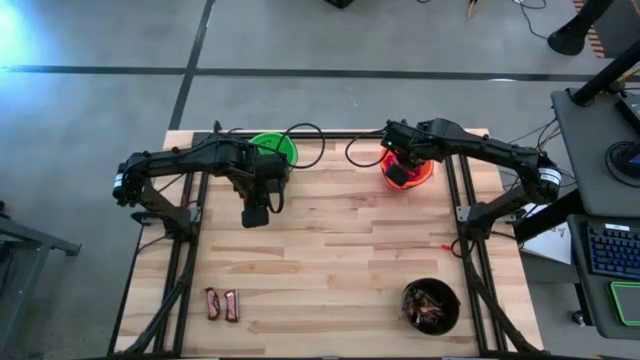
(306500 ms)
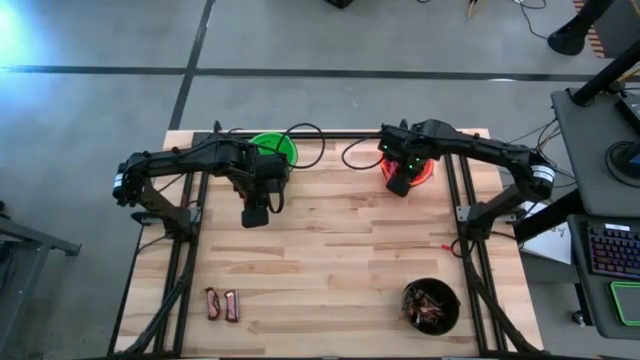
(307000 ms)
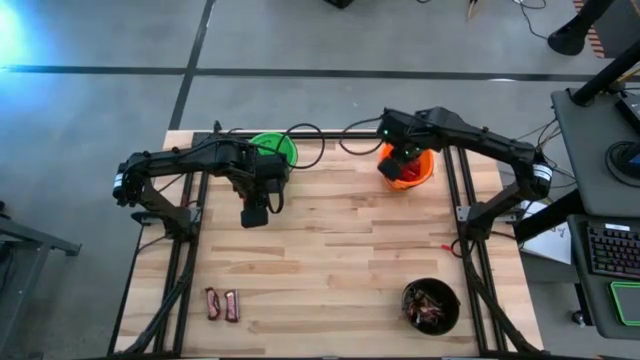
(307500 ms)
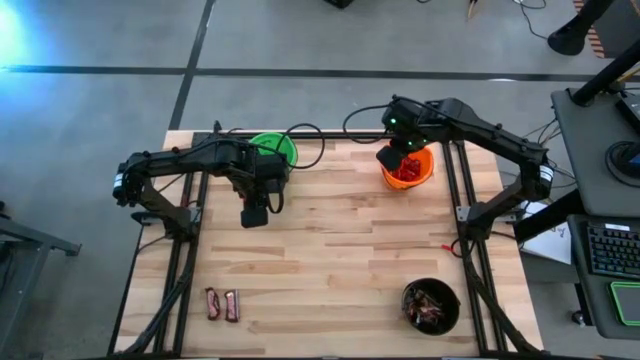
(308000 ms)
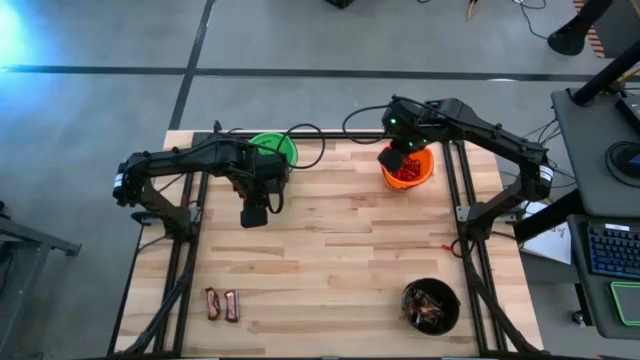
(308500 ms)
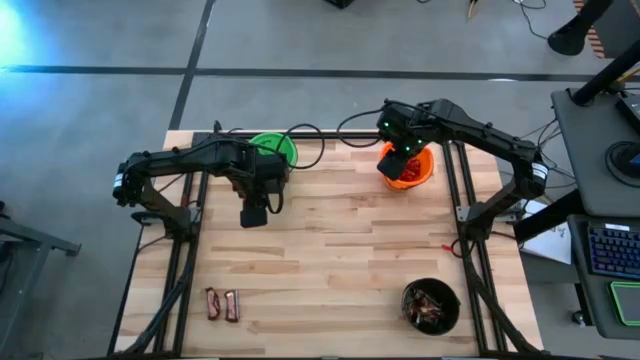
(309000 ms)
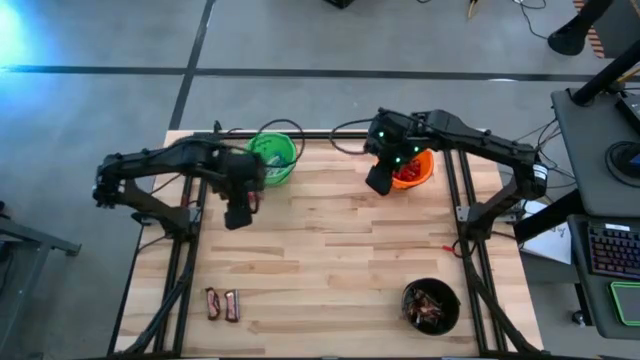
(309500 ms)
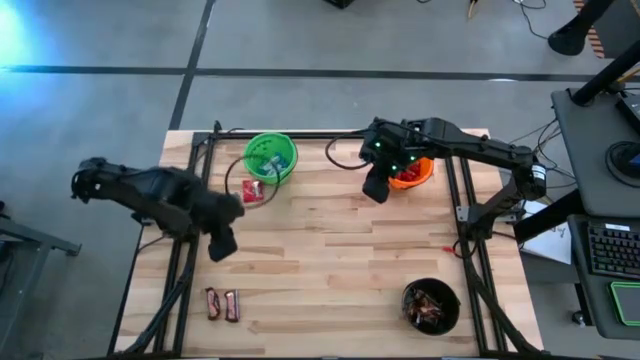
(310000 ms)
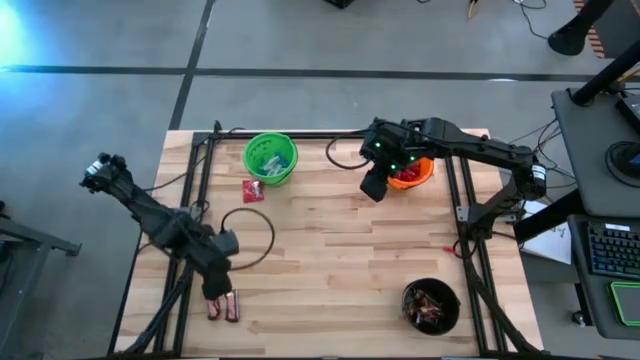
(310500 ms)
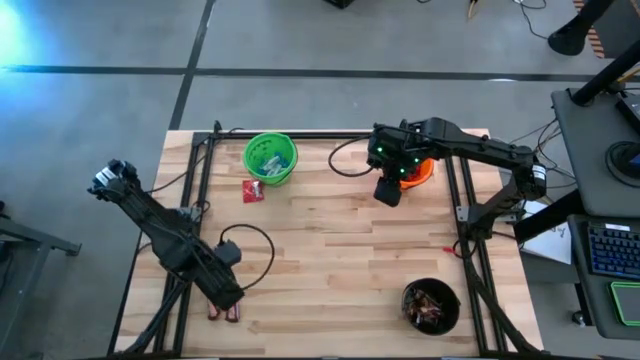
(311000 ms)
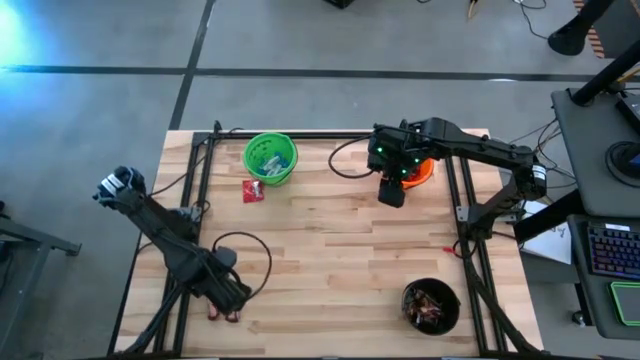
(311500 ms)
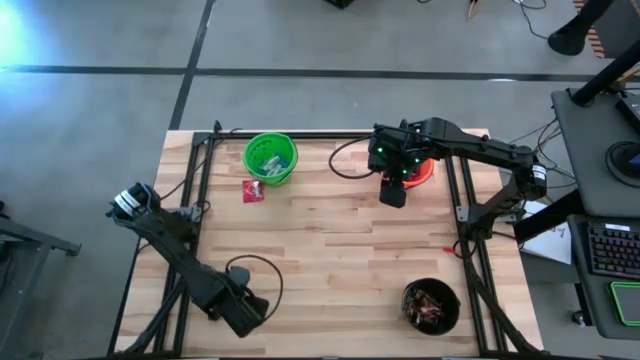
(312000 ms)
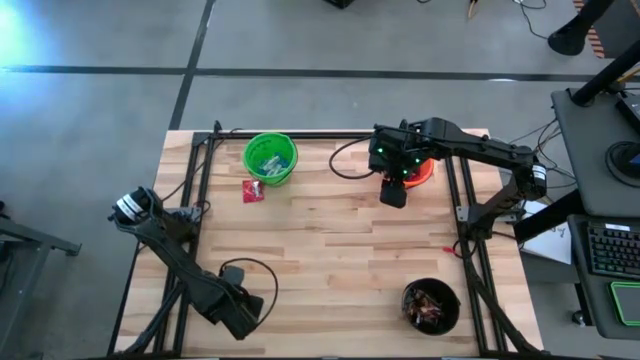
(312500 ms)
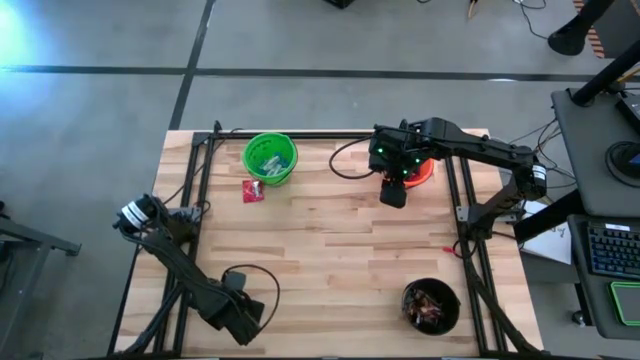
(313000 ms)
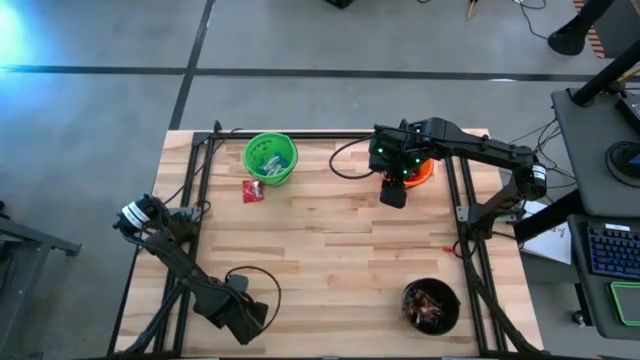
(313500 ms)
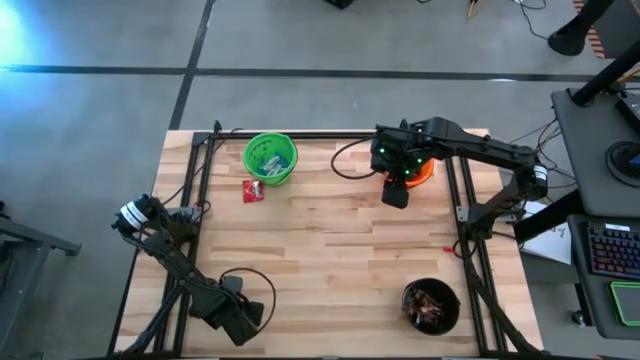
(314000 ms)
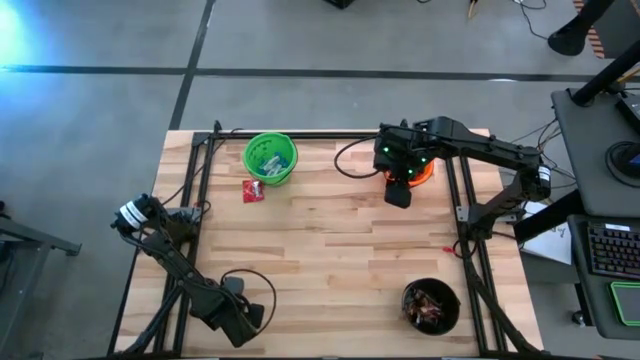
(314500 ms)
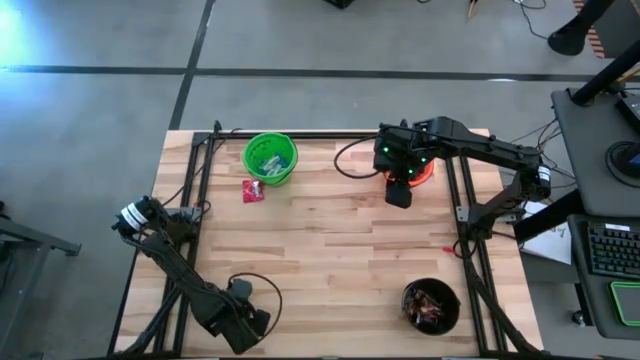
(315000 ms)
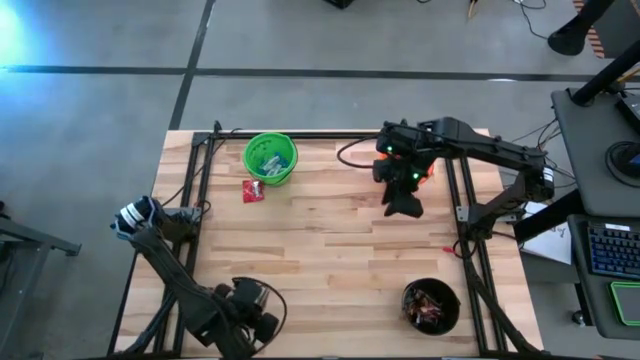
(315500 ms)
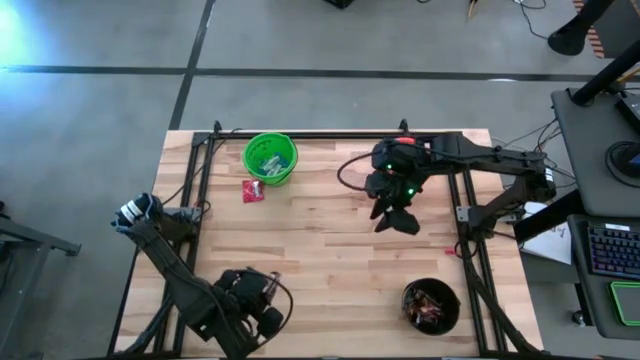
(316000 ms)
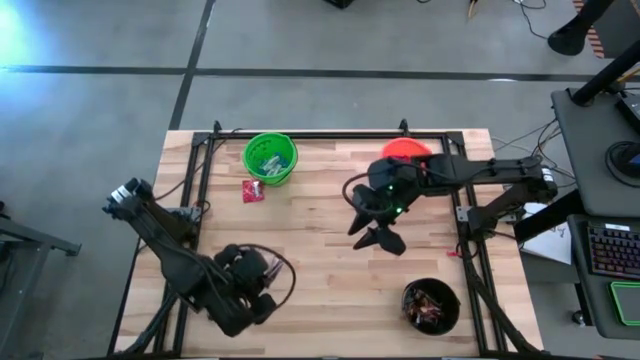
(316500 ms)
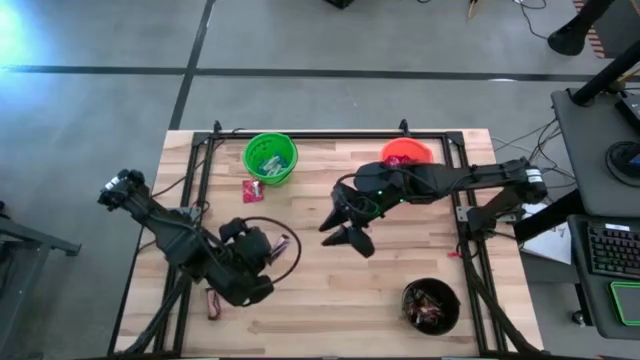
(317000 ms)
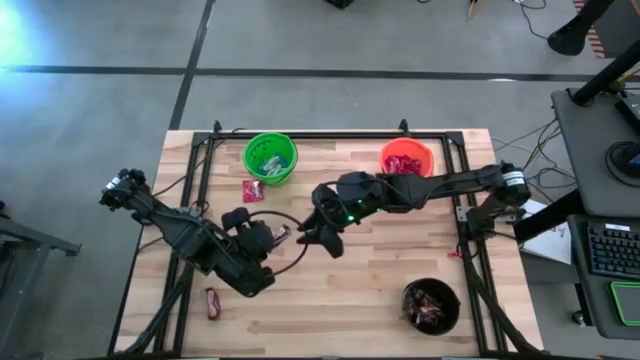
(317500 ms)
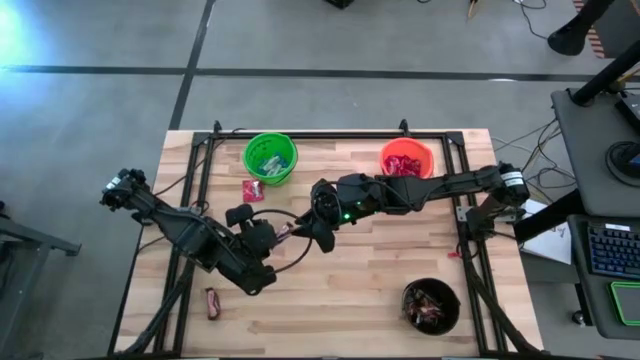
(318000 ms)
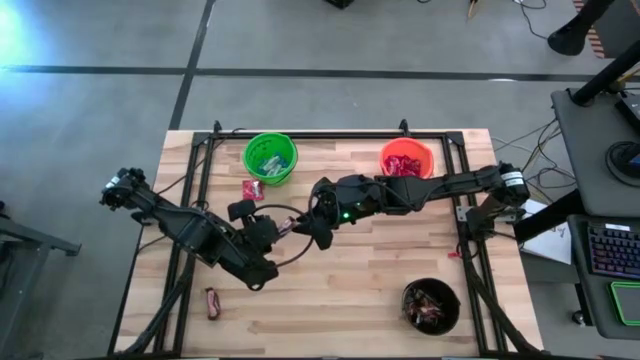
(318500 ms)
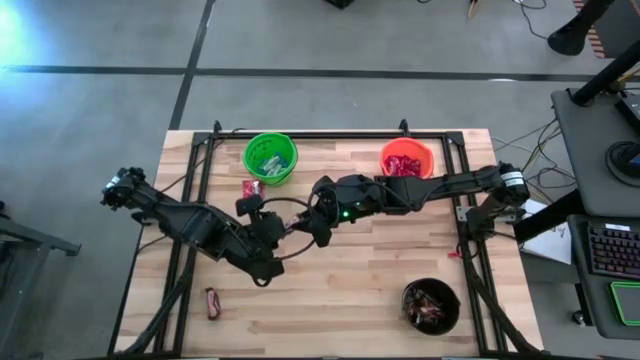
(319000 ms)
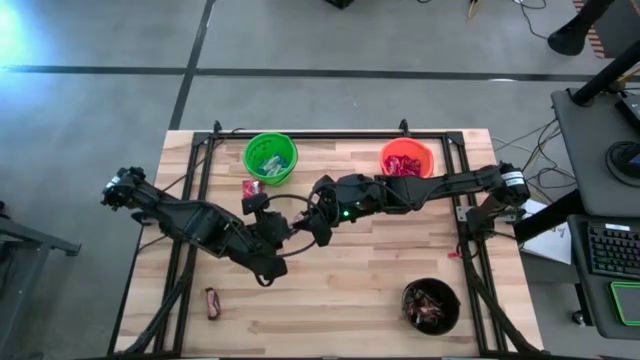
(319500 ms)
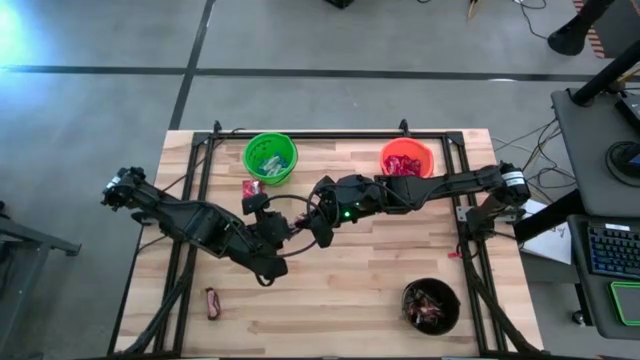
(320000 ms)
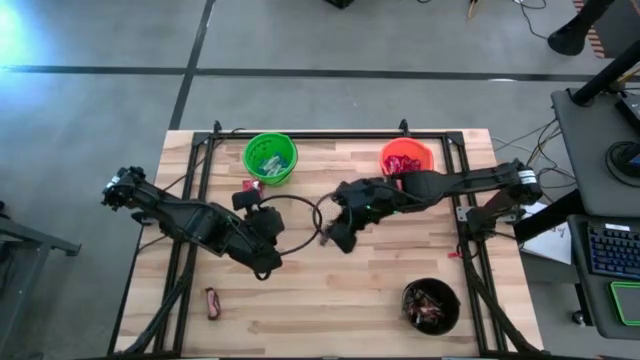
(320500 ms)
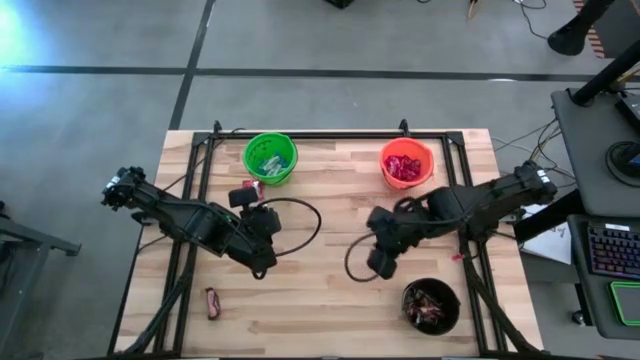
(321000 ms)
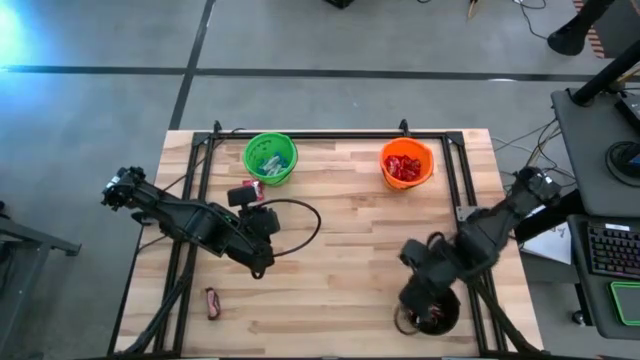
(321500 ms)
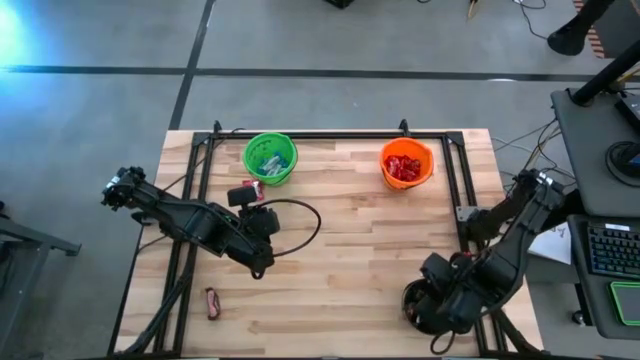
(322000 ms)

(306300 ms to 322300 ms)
Task: Sort candy
Put the brown candy into the black bucket

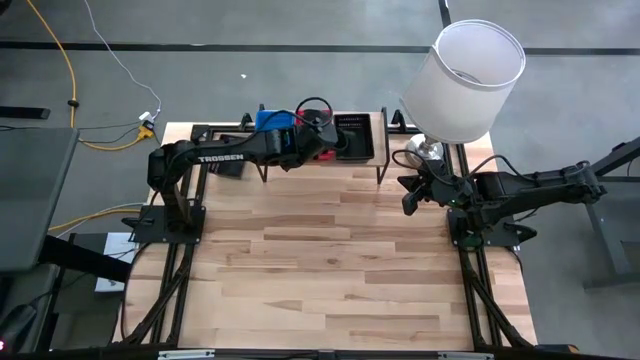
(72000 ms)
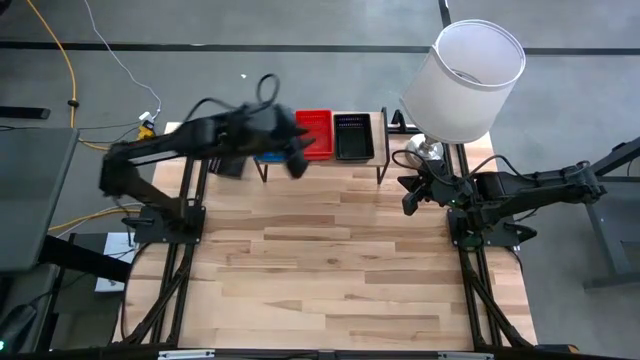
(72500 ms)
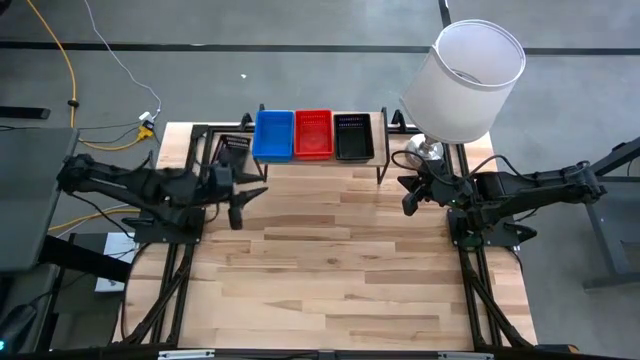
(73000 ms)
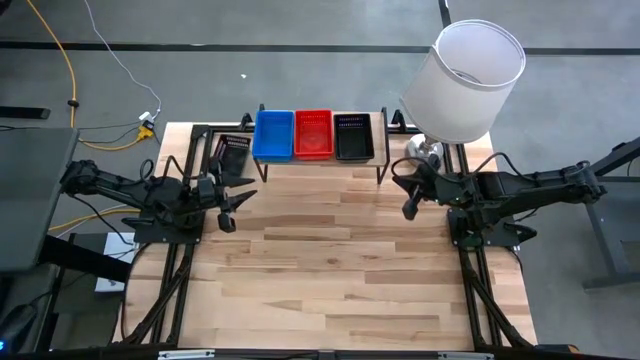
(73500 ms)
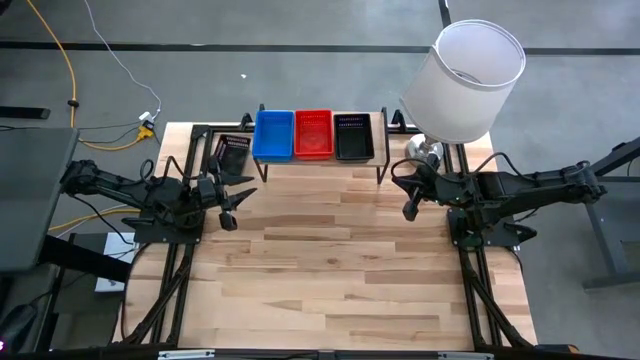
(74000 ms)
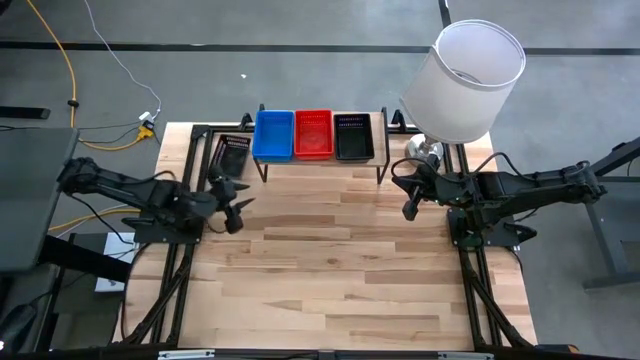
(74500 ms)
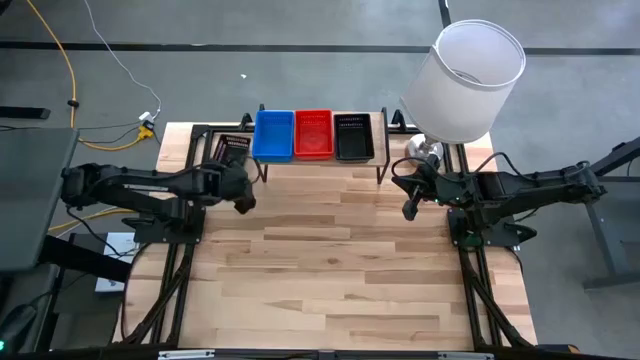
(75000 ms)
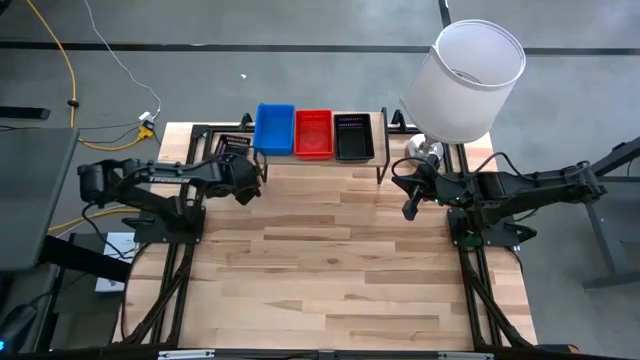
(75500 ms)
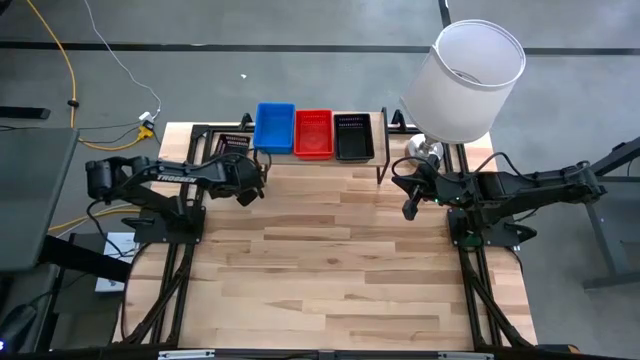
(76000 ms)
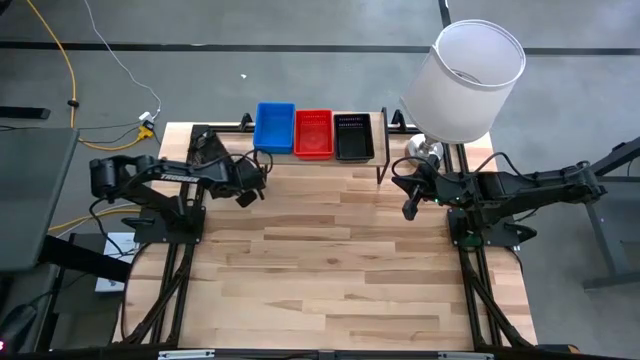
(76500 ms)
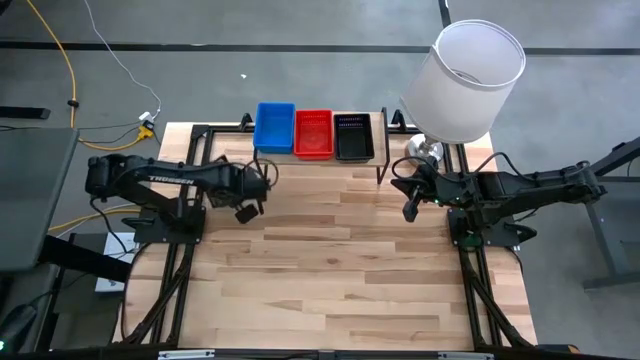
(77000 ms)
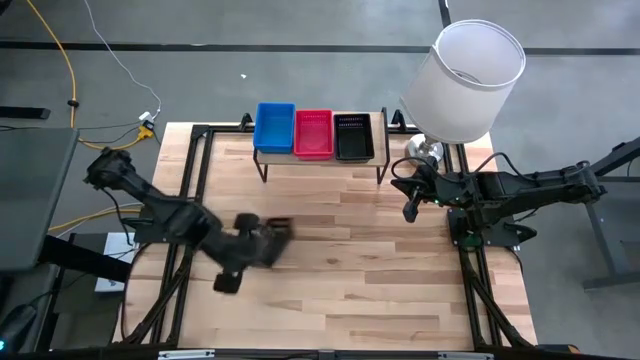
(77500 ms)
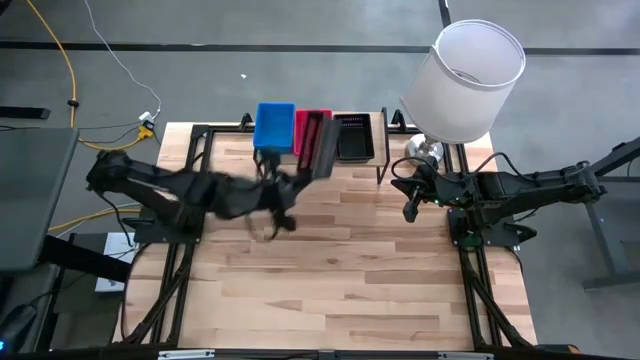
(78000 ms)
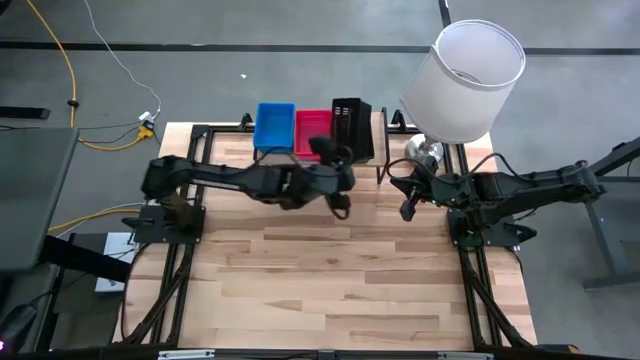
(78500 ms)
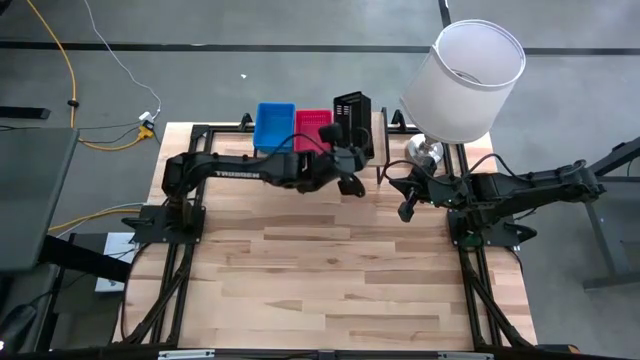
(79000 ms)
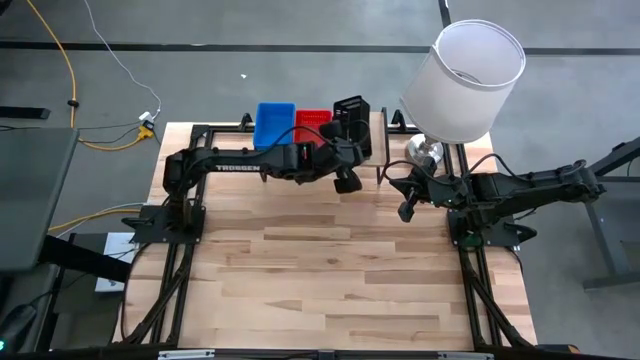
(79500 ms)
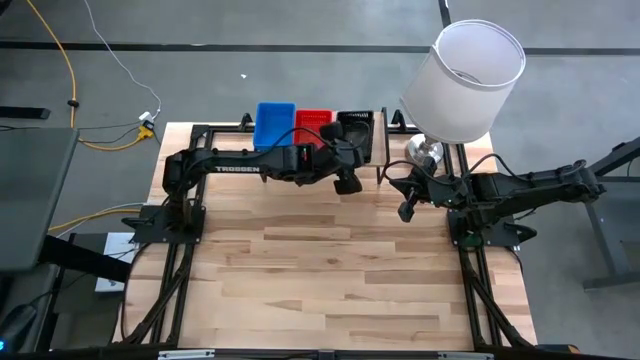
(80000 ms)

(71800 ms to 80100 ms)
Task: Stack baskets on shelf by color
Stack the black bin on top of the black bin on the shelf
